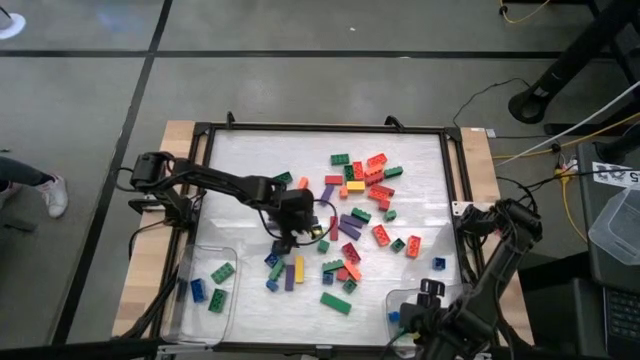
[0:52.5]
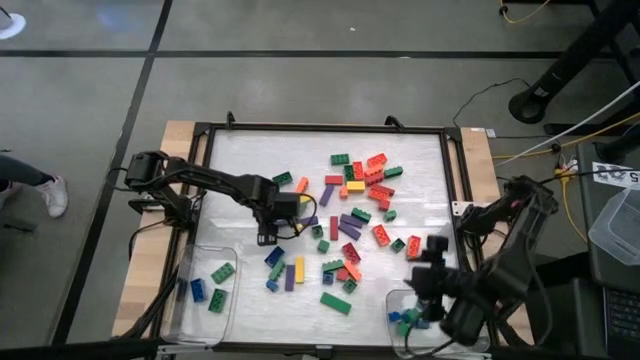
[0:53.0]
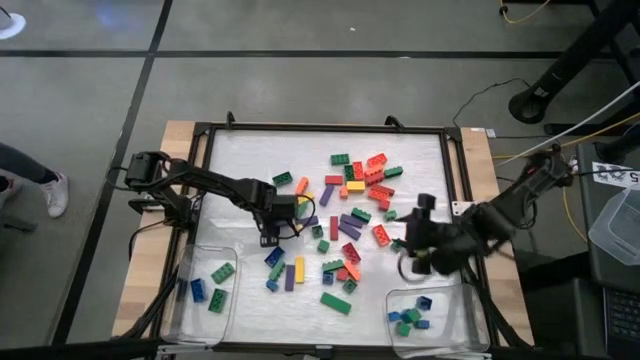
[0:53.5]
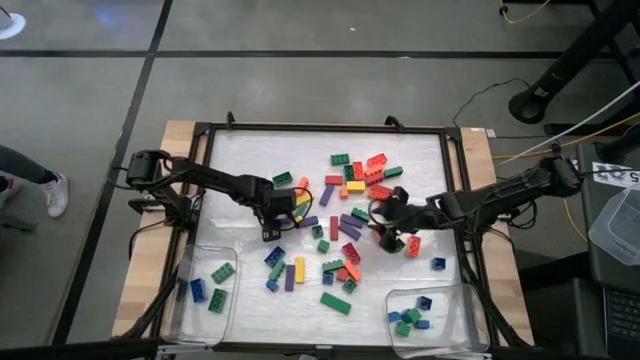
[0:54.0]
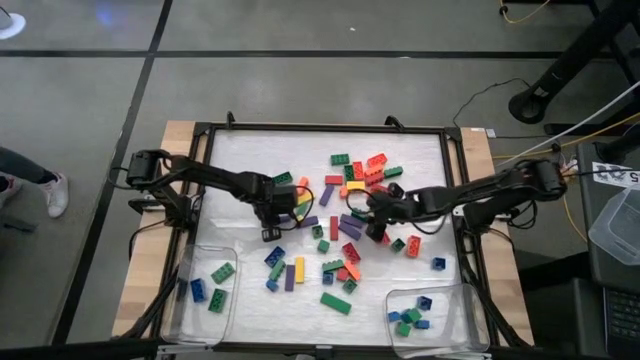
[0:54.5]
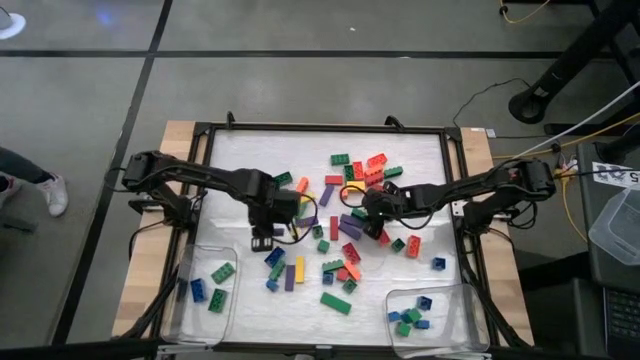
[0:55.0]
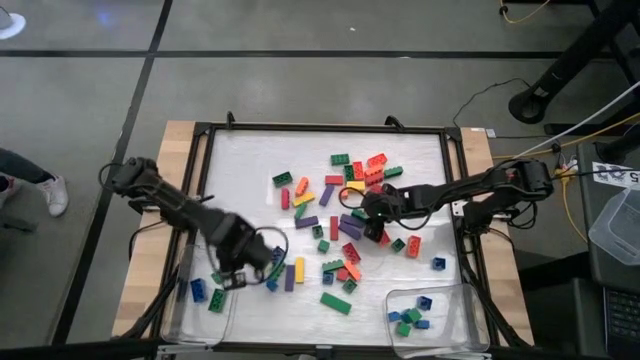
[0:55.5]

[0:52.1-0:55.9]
Task: Sort blocks by size
Put the large violet block into the left transparent bin

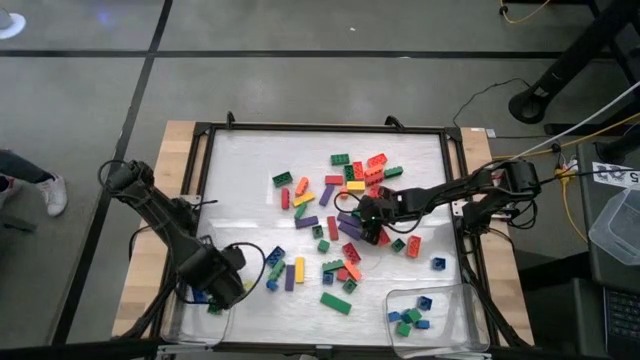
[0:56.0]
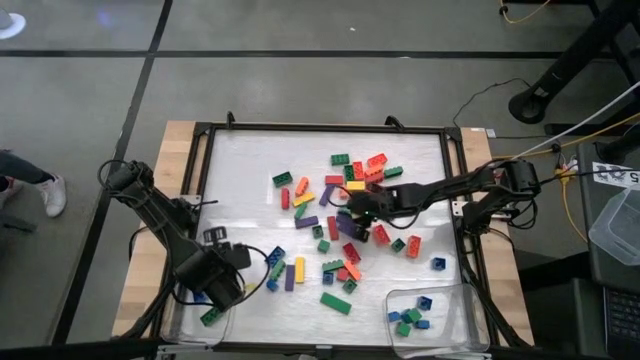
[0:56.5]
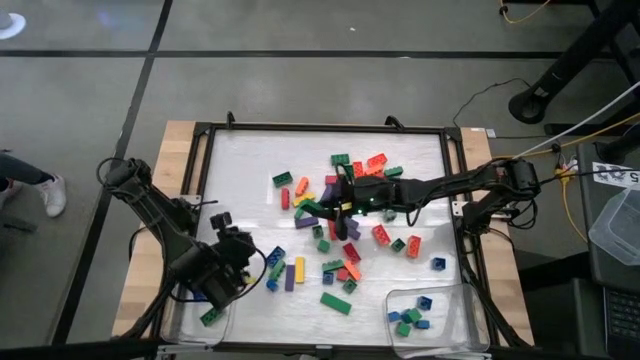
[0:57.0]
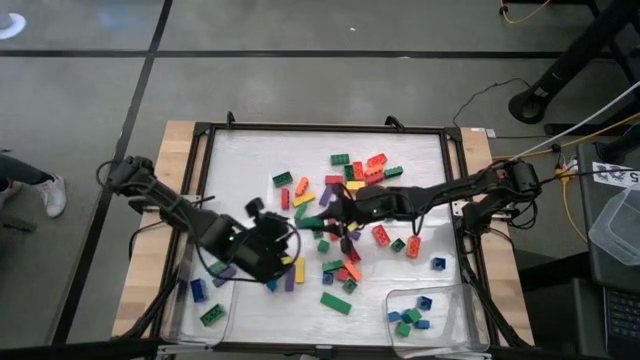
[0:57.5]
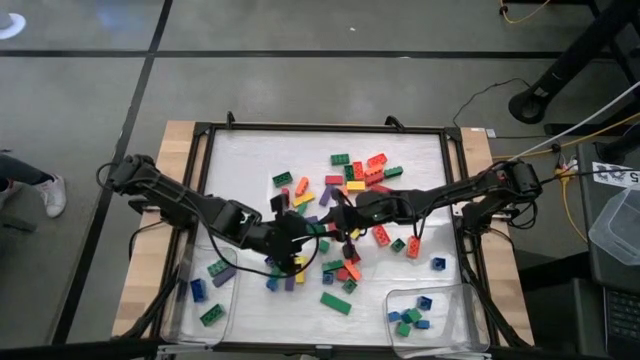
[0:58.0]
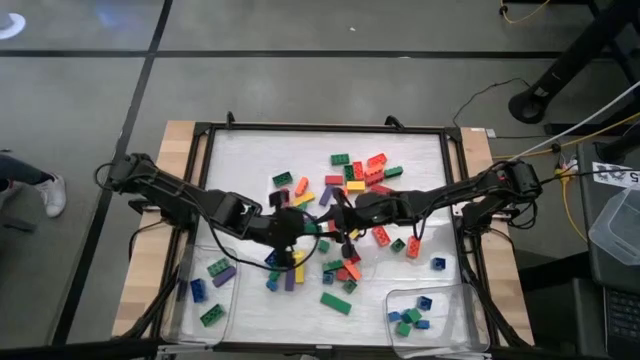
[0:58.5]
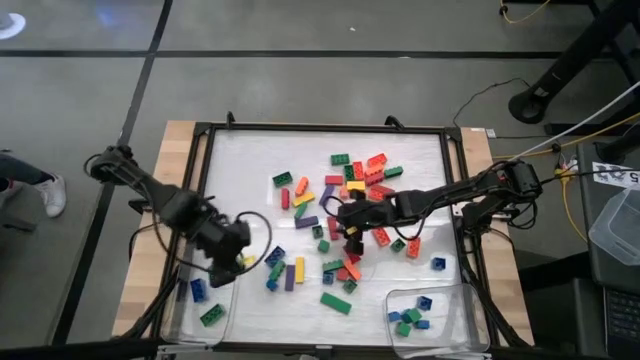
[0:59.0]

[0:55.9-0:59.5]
Put the large green game piece into the left transparent bin

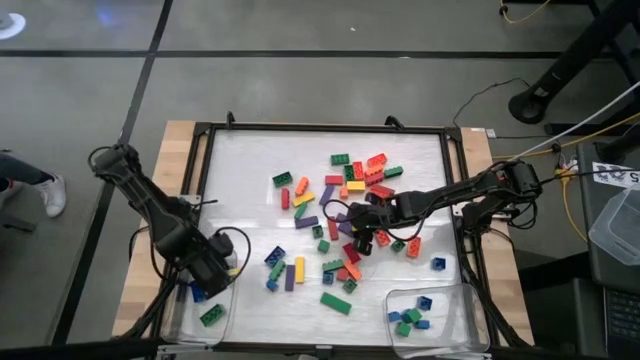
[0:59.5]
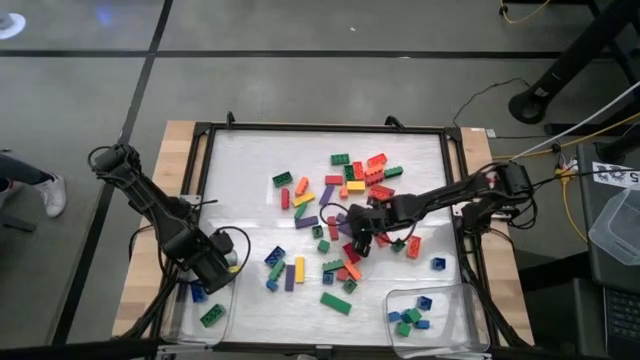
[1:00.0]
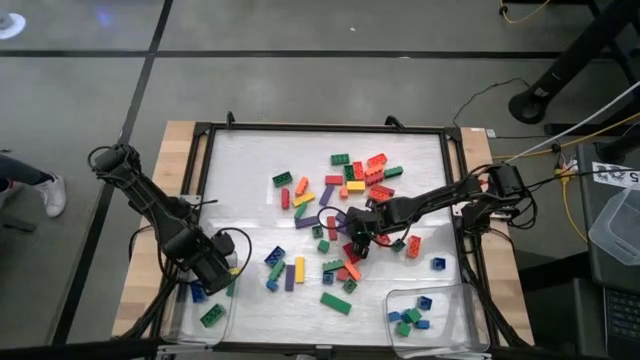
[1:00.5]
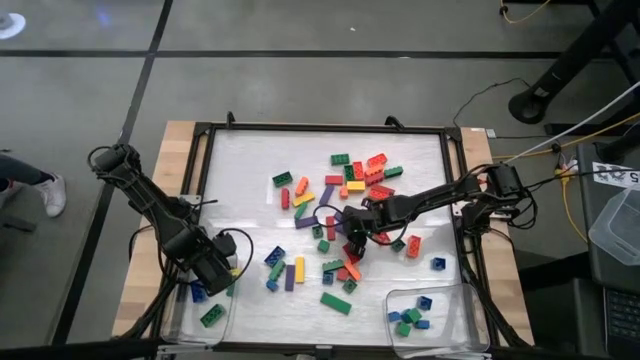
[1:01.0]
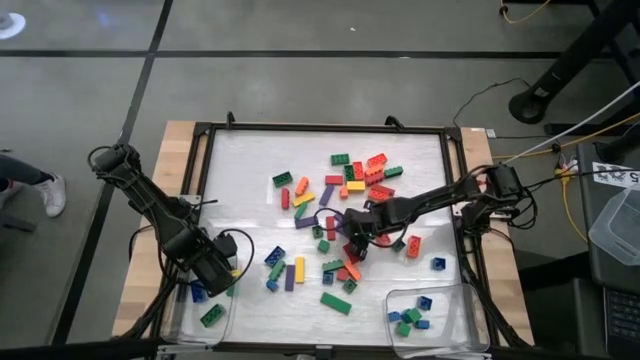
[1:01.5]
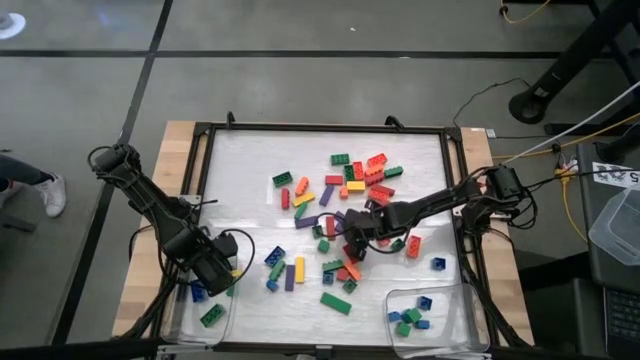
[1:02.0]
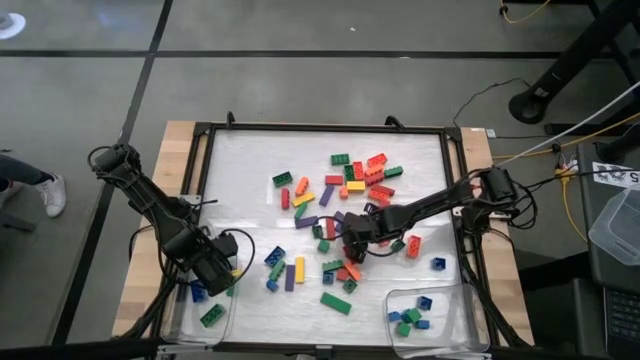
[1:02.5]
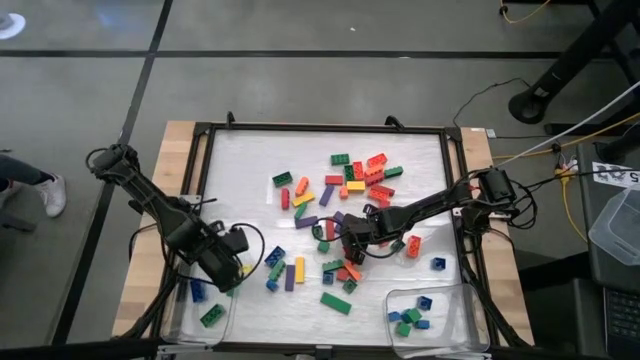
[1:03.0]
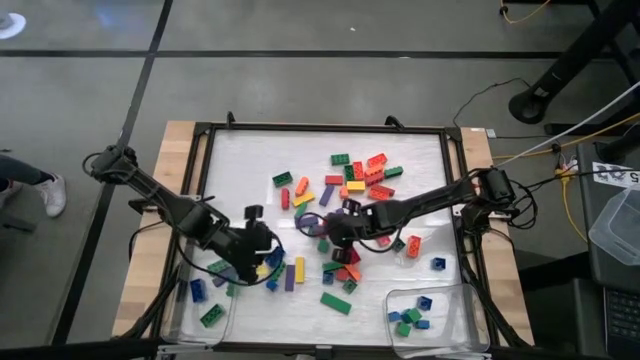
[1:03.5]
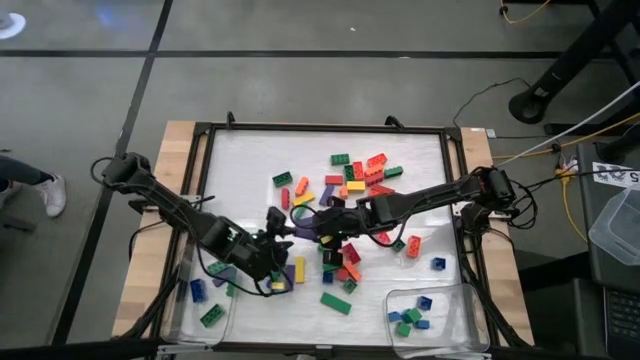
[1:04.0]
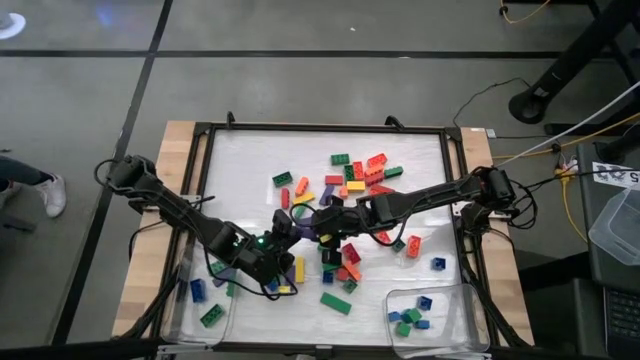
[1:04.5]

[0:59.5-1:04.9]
Put the large violet block into the left transparent bin

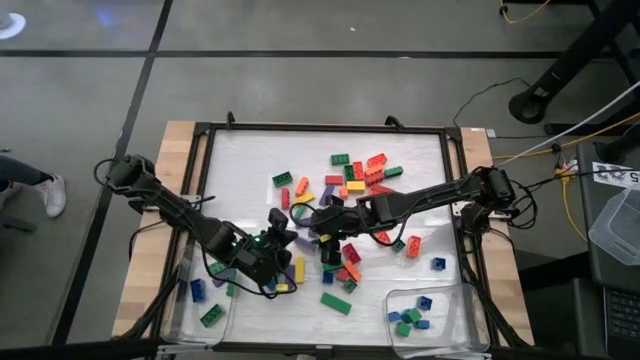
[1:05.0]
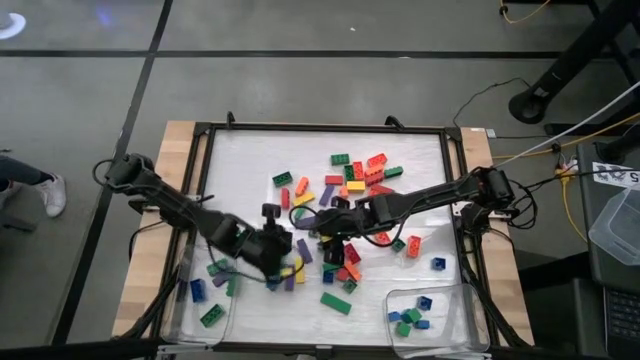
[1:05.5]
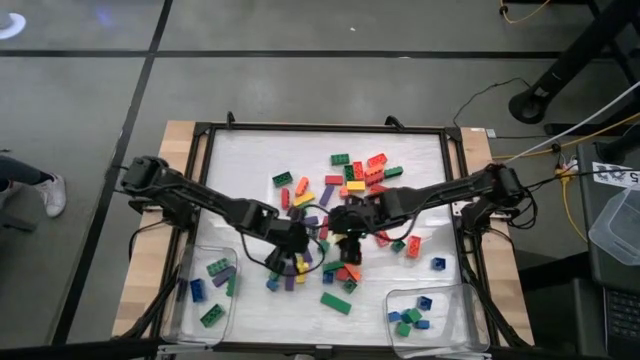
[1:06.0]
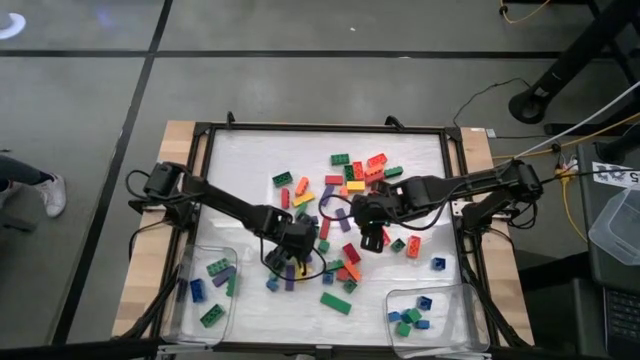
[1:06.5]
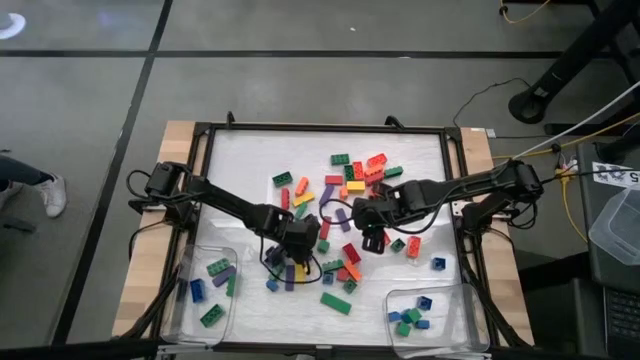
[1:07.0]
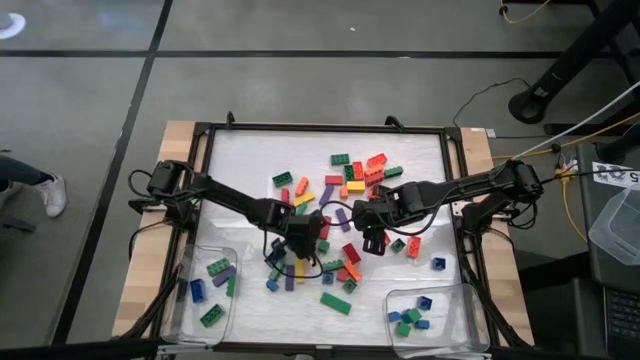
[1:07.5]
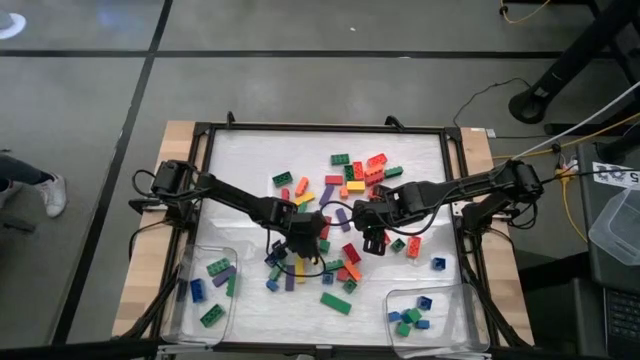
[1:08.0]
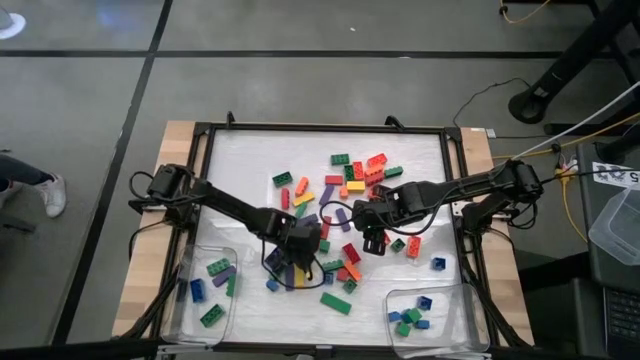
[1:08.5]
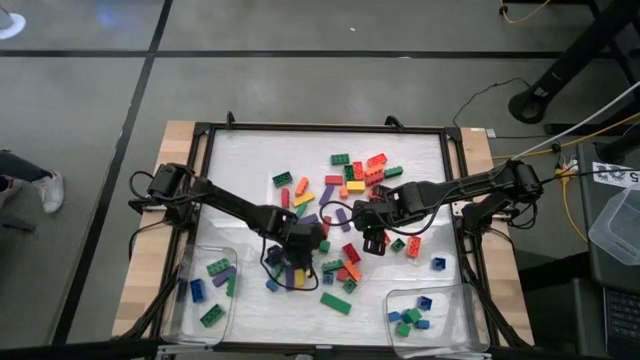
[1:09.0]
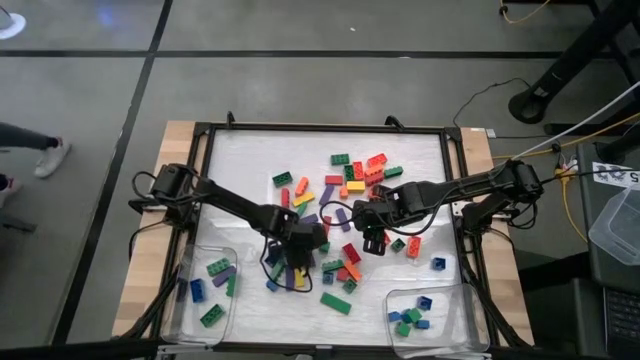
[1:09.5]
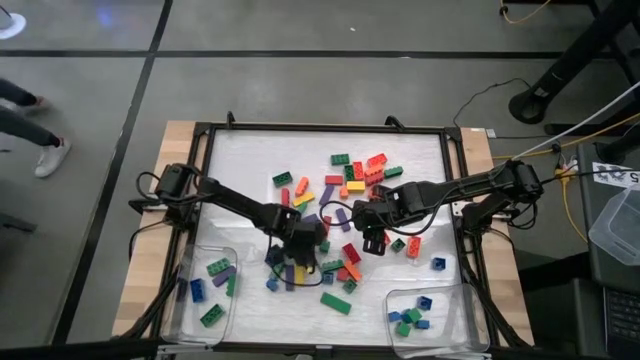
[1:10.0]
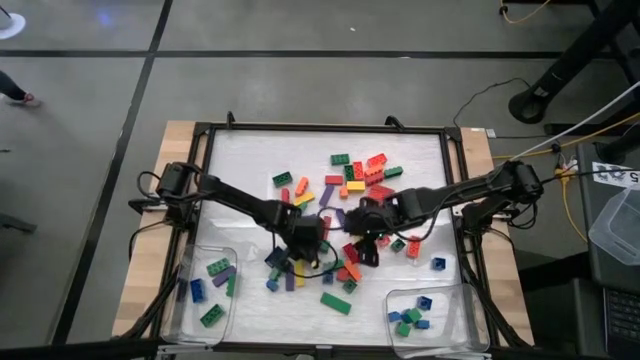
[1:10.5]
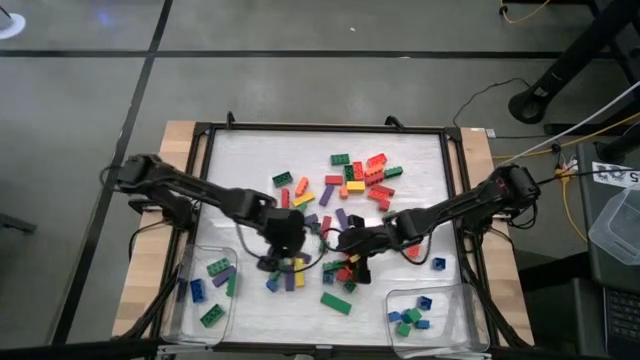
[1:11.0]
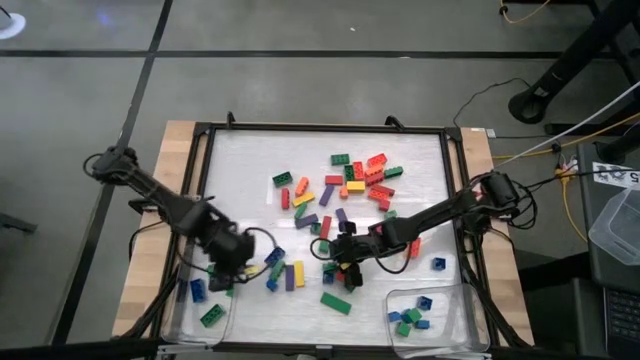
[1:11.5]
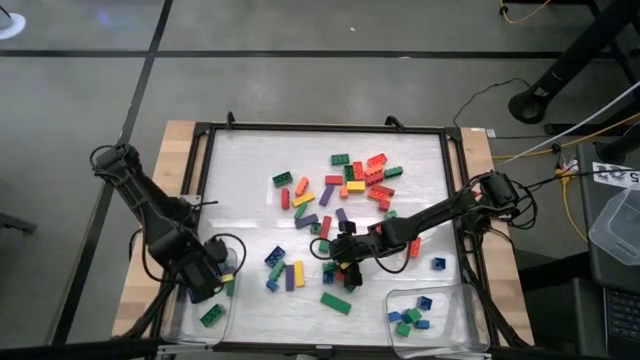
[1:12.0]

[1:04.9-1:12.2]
Put the large violet block into the left transparent bin
